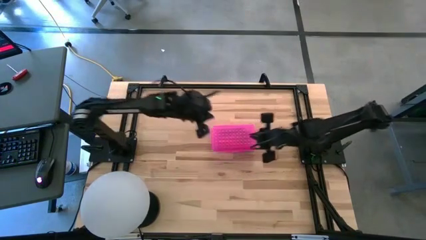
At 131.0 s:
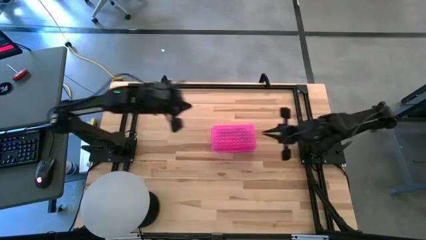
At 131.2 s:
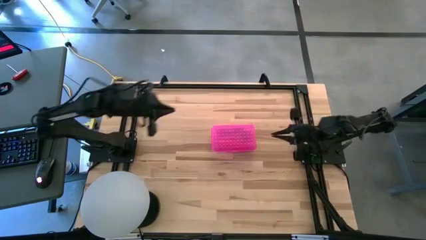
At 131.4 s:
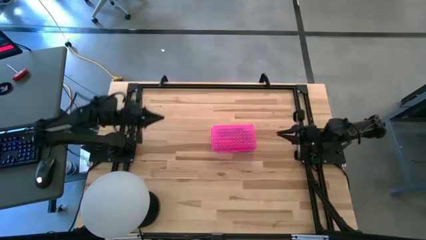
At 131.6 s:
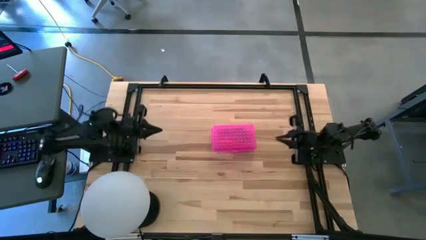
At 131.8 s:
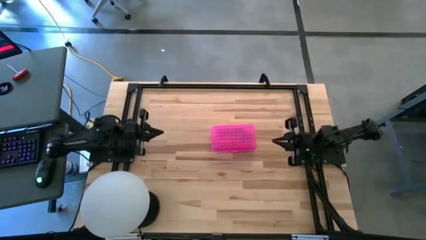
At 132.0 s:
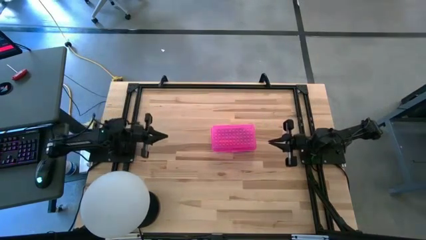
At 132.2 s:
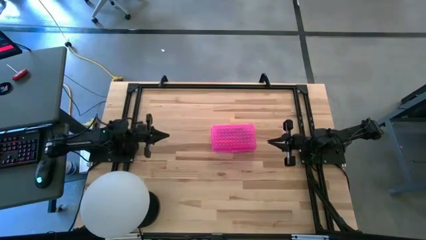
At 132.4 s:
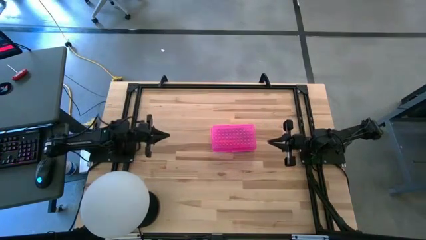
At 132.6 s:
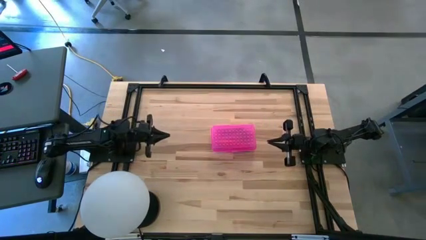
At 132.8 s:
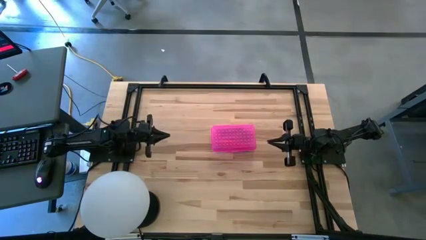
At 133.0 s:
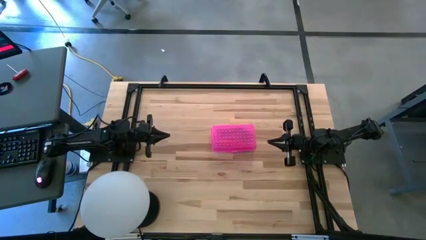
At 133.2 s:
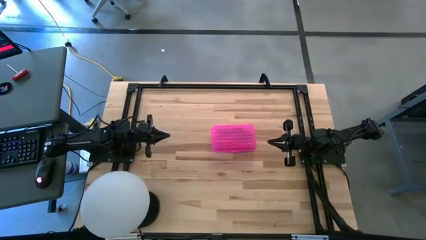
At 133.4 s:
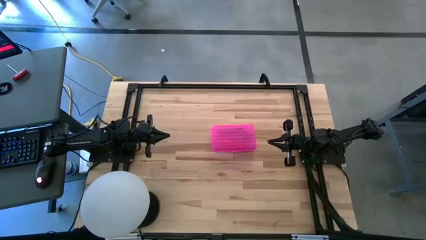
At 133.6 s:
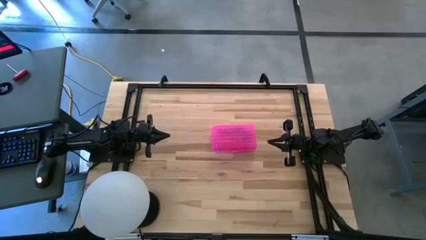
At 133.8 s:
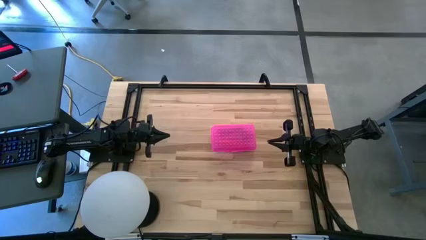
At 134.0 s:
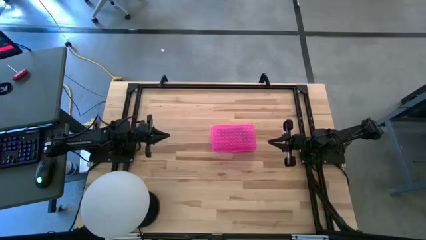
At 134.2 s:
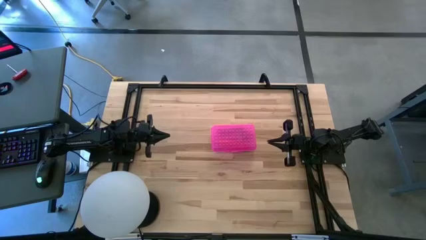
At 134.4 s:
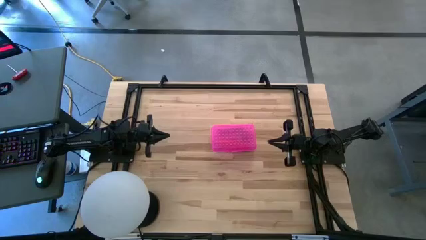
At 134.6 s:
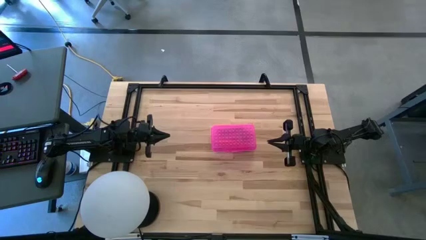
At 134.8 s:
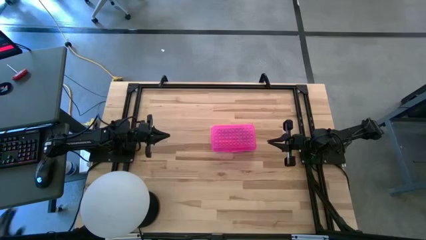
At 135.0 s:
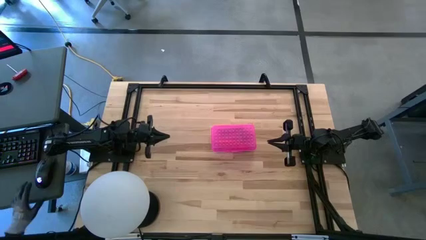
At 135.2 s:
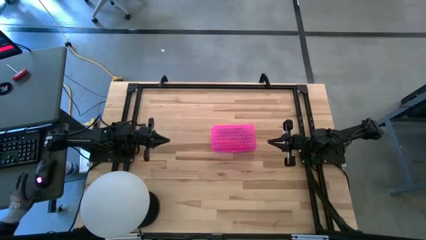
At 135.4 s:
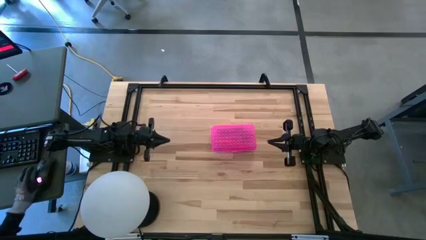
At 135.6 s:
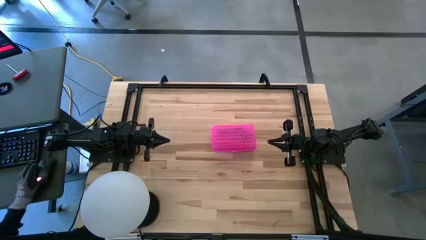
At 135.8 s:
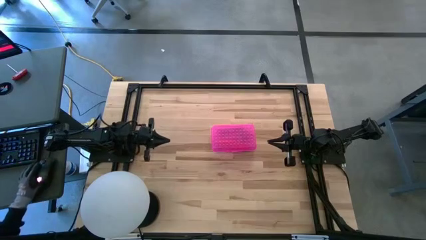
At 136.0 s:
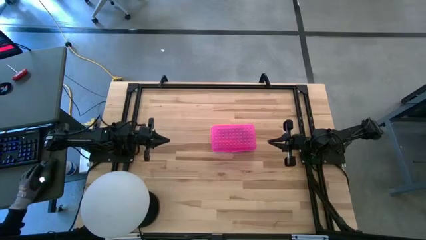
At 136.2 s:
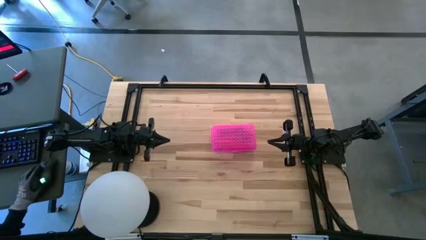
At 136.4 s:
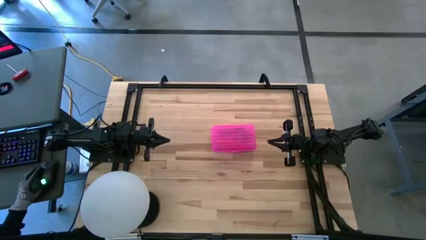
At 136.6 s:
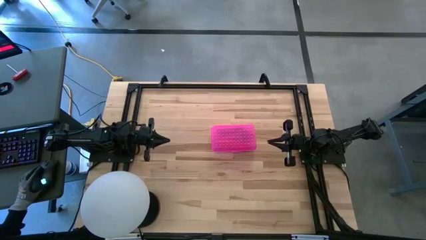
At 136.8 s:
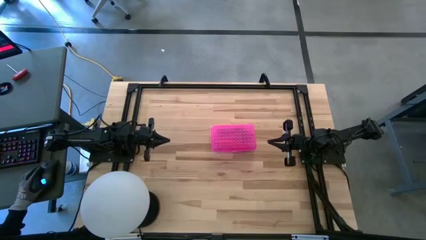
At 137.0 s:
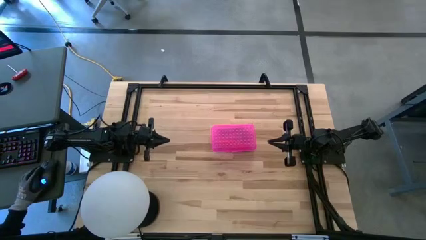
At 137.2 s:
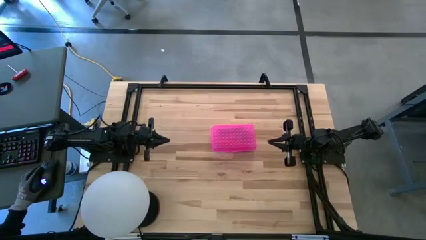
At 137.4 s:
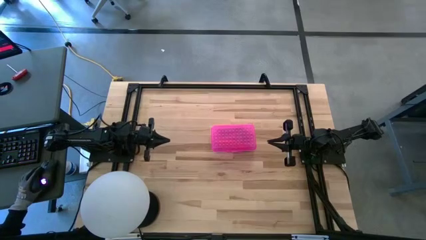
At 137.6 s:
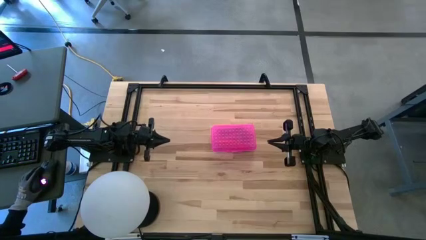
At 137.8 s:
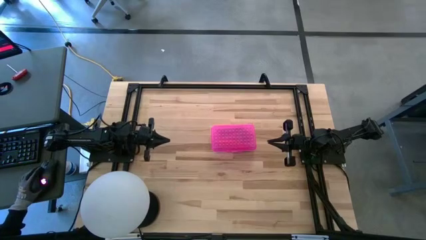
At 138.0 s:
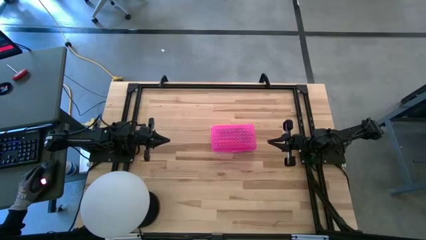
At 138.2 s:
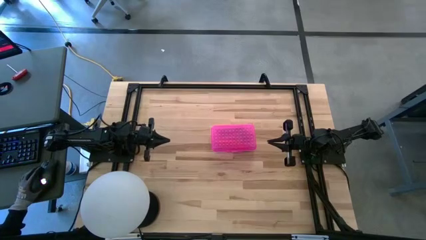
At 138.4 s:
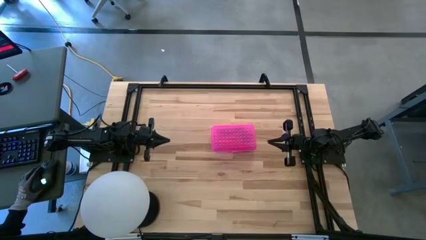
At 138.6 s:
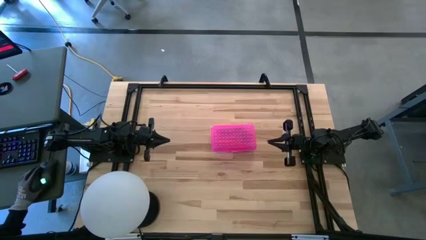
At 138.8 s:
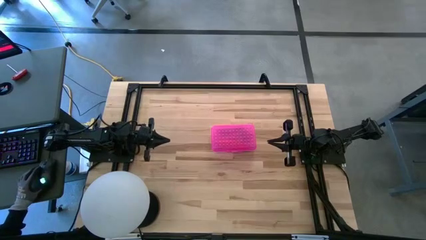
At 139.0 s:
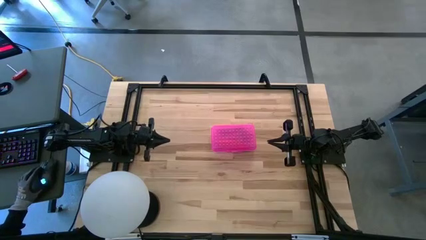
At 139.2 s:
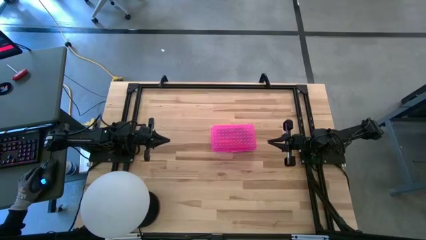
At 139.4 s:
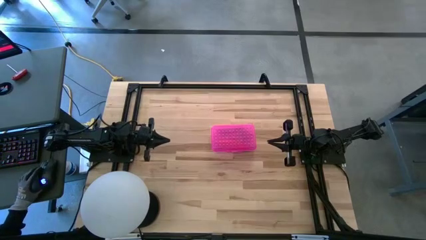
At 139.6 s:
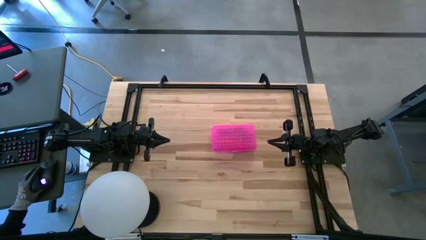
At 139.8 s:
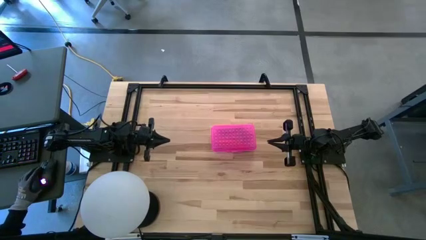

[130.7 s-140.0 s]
Task: Pick & place school supplies into a supply box
Return to Home Position

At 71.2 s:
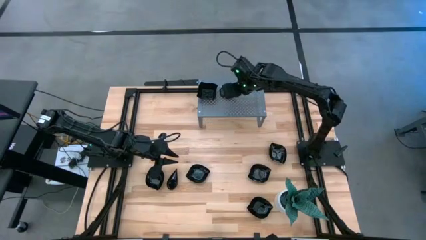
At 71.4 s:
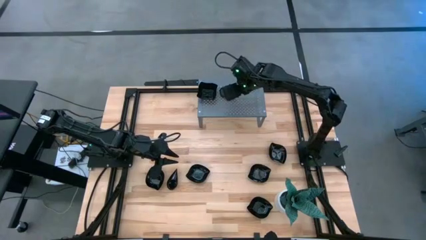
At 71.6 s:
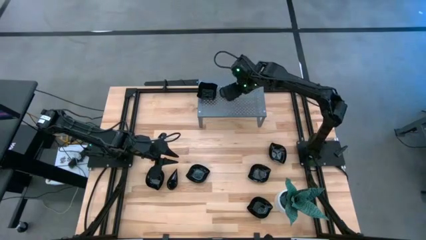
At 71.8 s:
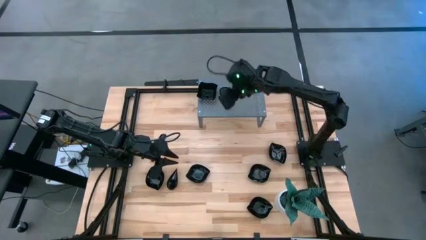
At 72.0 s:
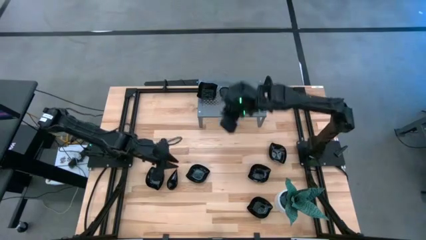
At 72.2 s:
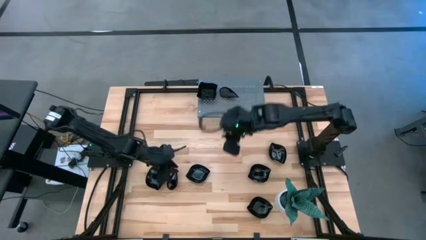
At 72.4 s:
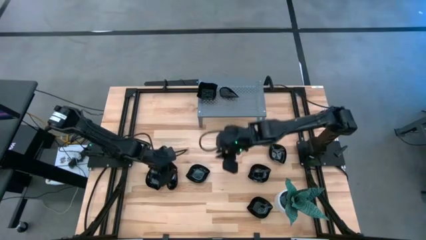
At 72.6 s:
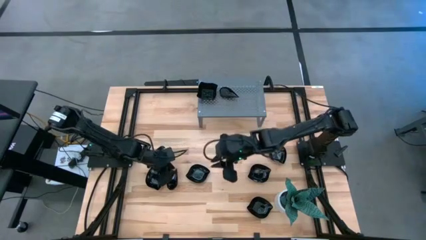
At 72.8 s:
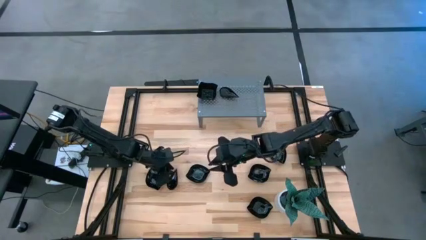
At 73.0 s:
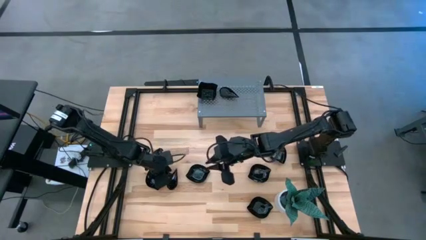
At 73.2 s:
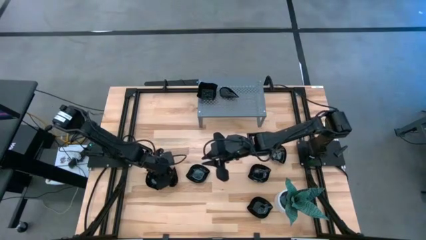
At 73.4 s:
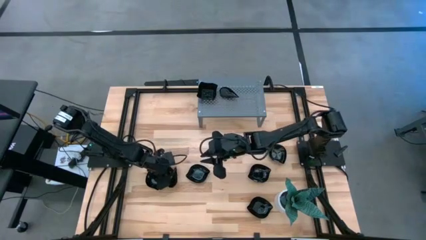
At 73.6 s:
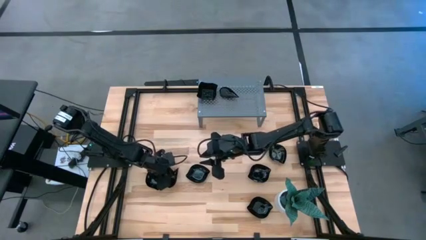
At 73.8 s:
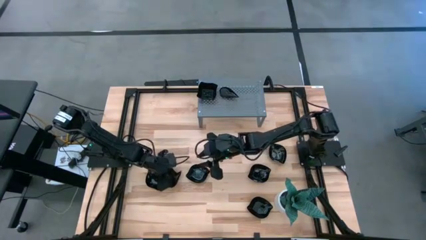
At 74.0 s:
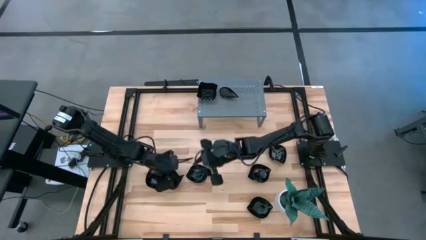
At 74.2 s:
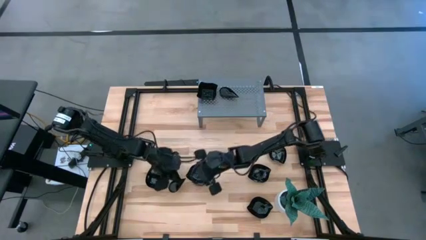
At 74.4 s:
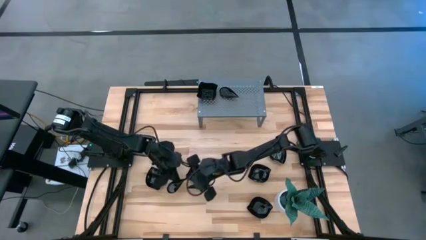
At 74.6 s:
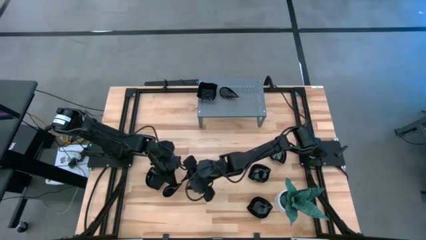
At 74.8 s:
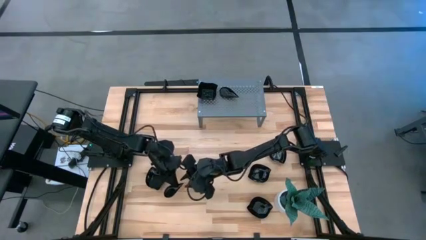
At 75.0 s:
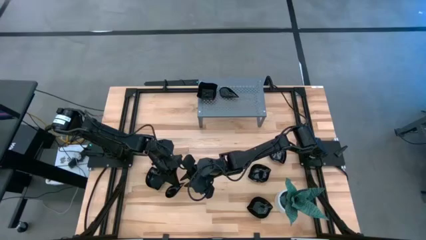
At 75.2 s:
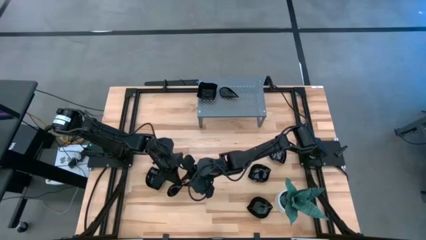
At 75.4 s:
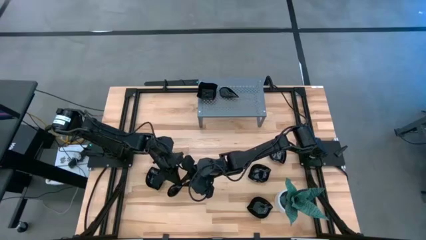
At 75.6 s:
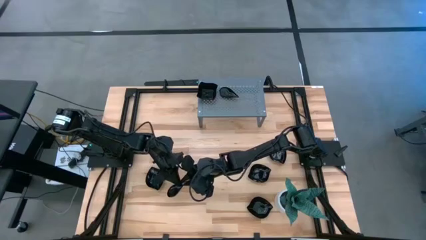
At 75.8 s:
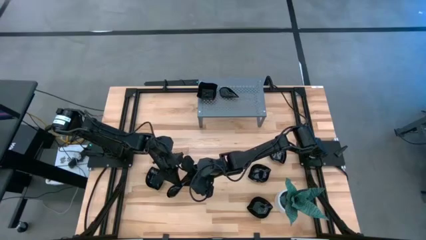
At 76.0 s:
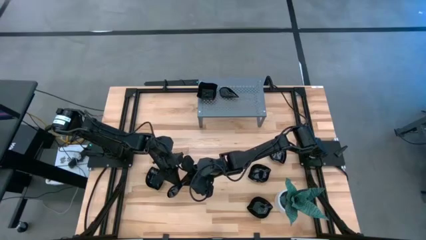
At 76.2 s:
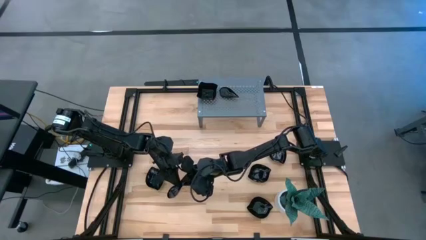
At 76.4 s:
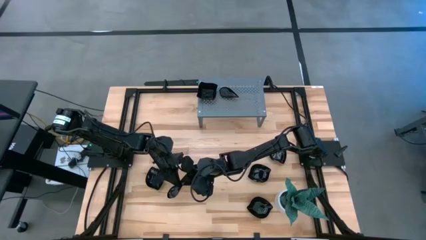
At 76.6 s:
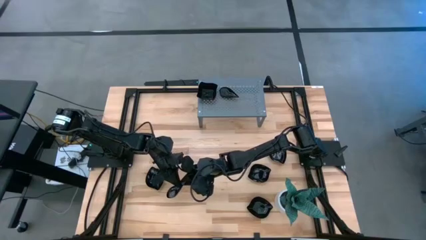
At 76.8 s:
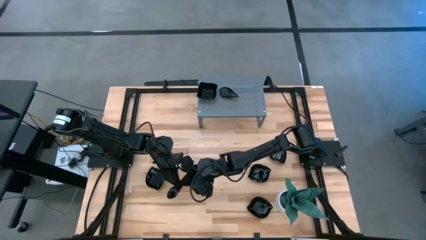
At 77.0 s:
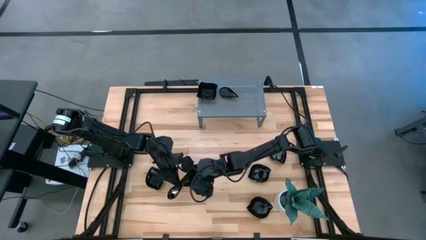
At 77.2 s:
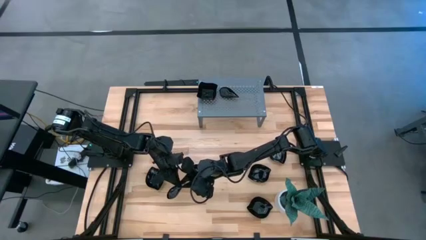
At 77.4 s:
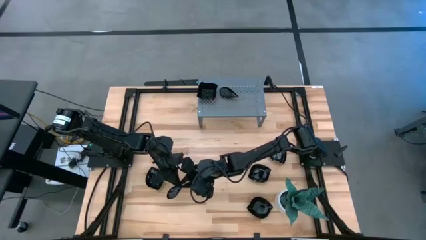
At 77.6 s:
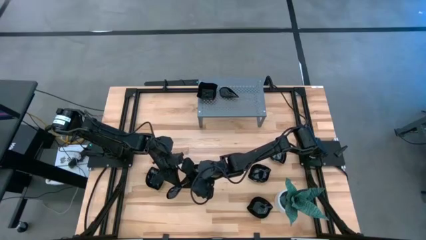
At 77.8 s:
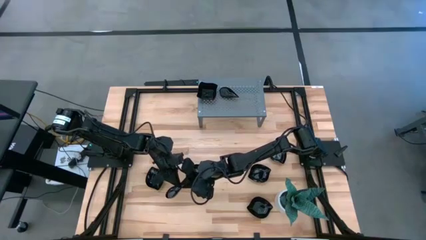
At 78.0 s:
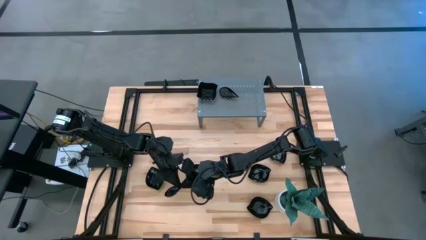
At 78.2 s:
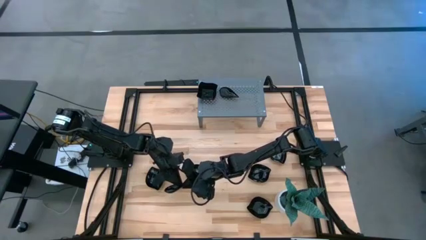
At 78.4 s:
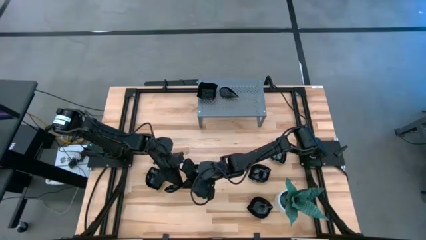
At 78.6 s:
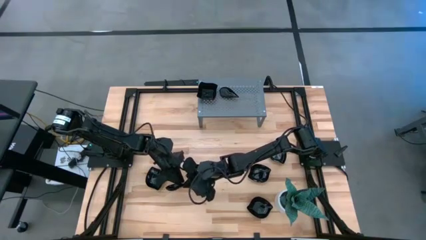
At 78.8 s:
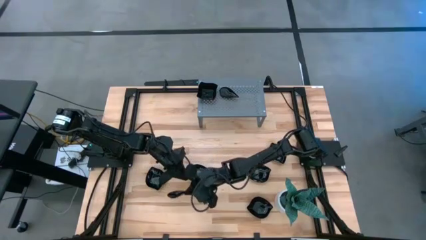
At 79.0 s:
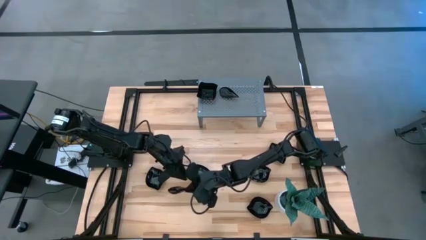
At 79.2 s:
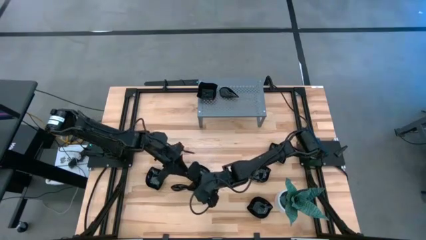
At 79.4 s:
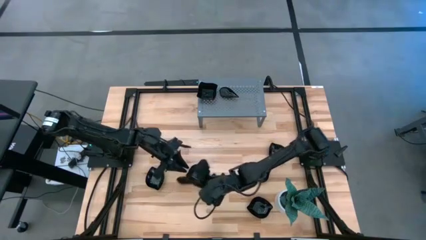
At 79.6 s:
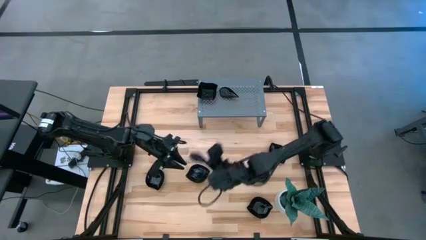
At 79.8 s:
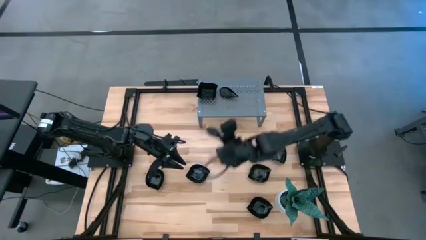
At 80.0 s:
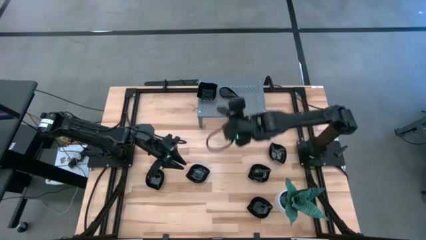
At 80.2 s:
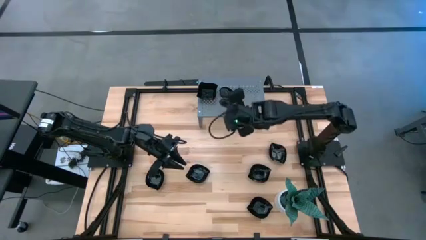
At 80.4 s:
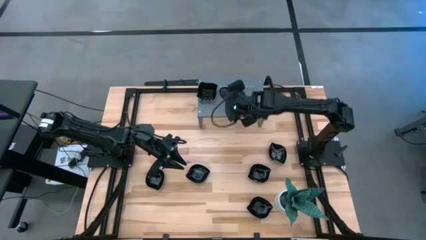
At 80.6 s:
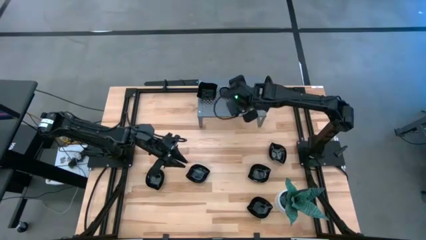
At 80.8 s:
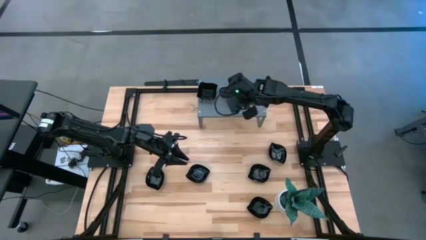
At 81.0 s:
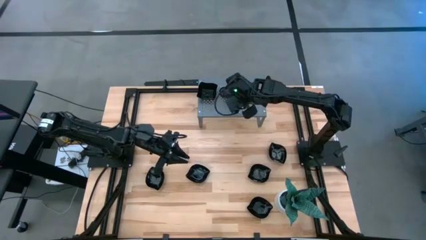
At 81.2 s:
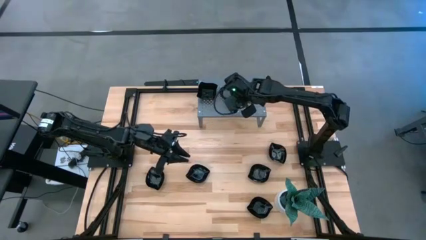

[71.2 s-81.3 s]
Task: Pick & Place Mini shaped plates
Stack the drop-shaped plate on top of the drop-shaped plate on the shelf
